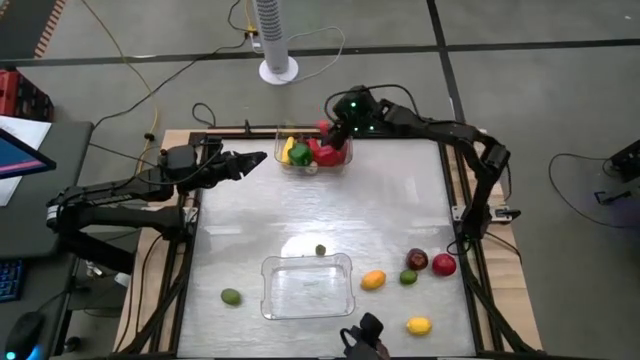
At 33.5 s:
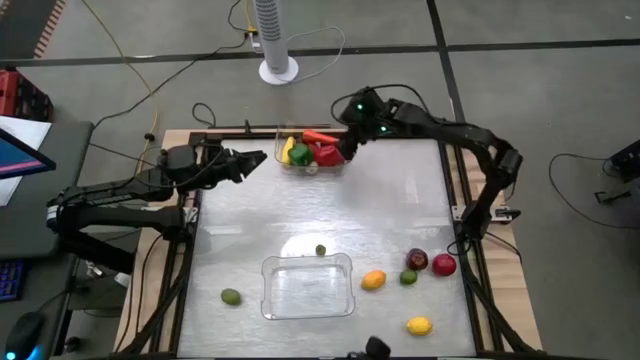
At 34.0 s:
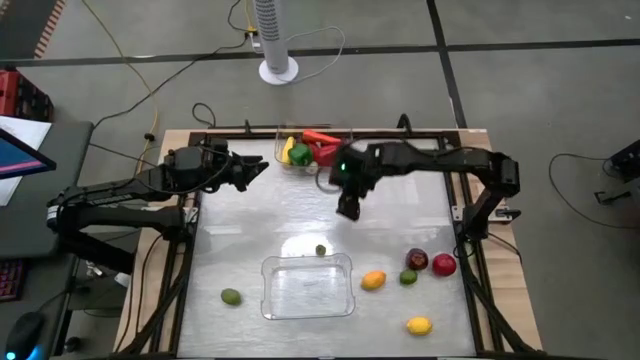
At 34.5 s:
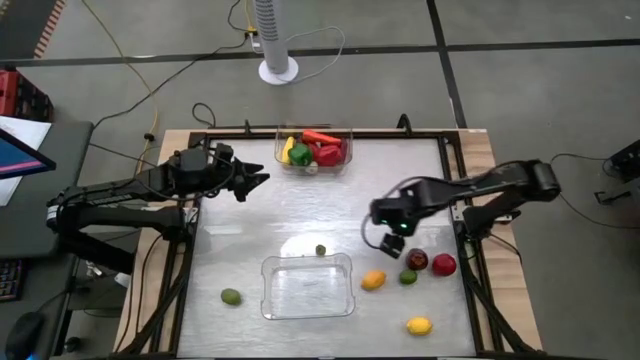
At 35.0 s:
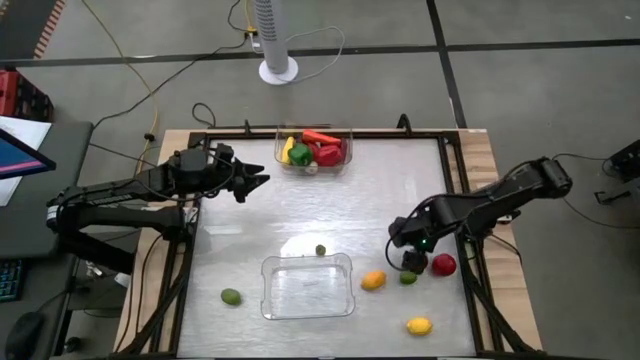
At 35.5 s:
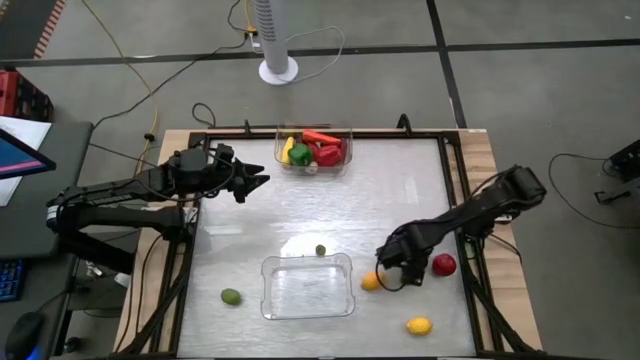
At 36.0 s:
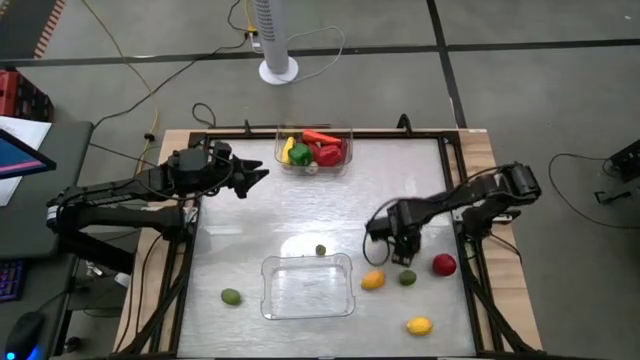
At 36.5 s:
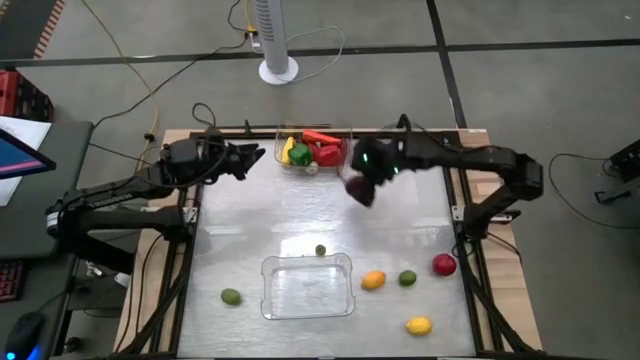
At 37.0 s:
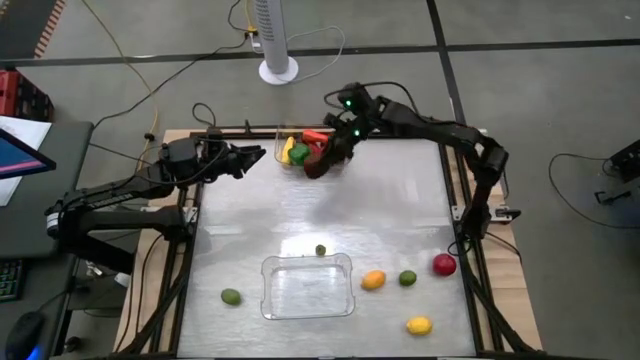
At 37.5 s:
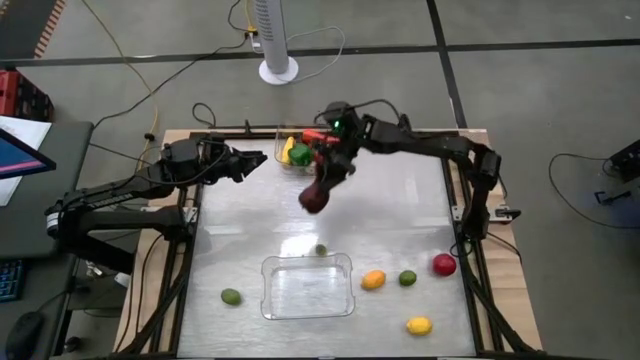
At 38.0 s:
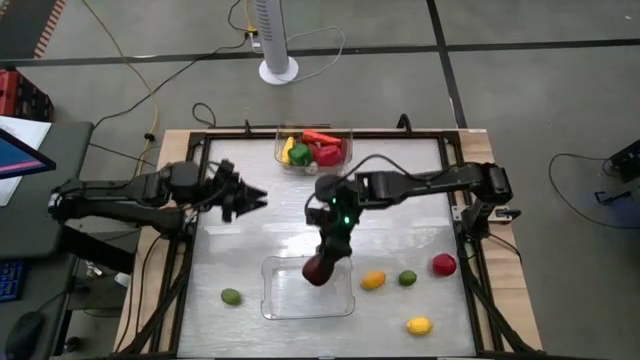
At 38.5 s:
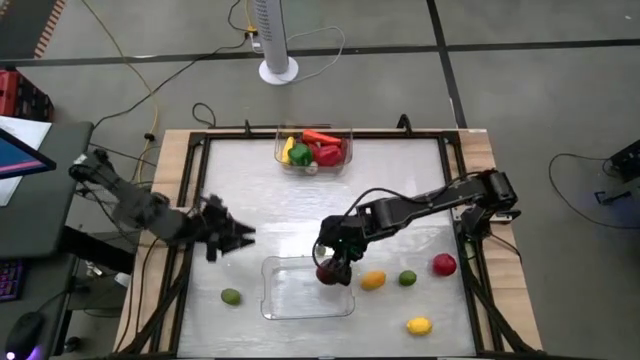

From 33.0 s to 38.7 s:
Task: Sort produce into baskets
Put the apple into the bottom transparent bin

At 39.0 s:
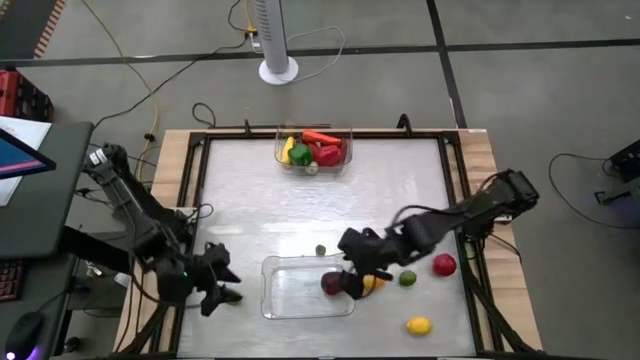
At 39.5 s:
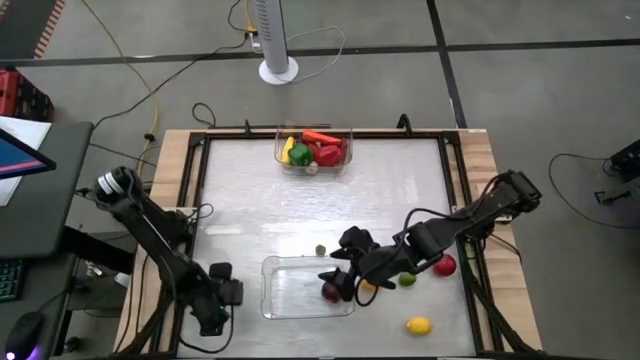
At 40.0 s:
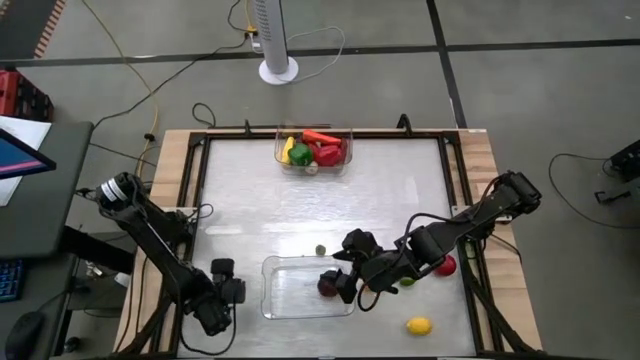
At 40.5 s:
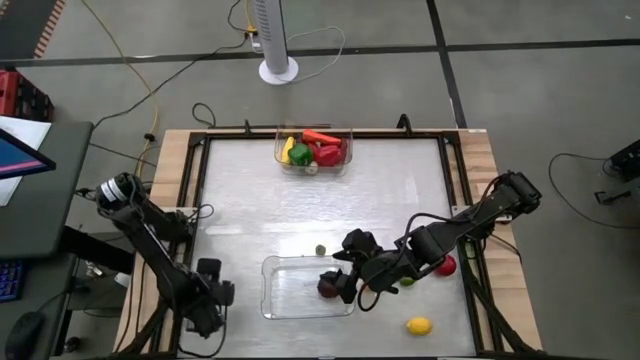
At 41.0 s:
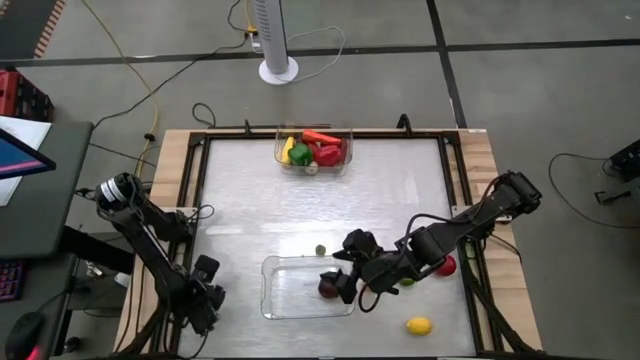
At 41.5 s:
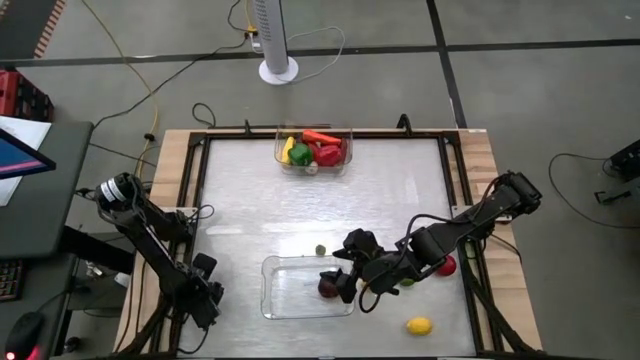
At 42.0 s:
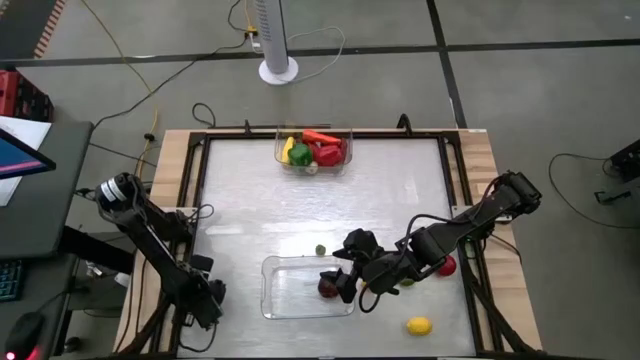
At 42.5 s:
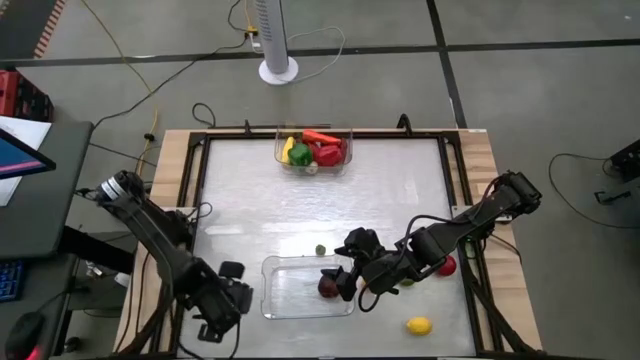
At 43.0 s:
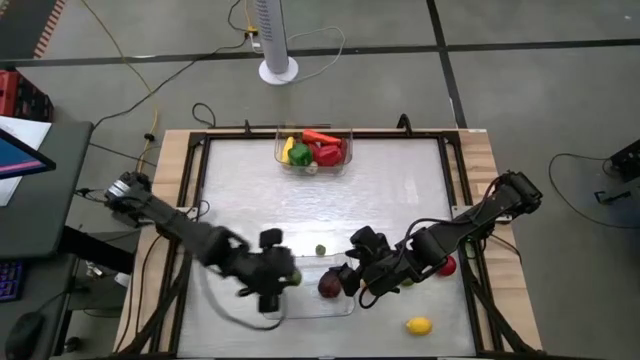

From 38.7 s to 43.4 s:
Put the top left green lime into the bottom transparent bin

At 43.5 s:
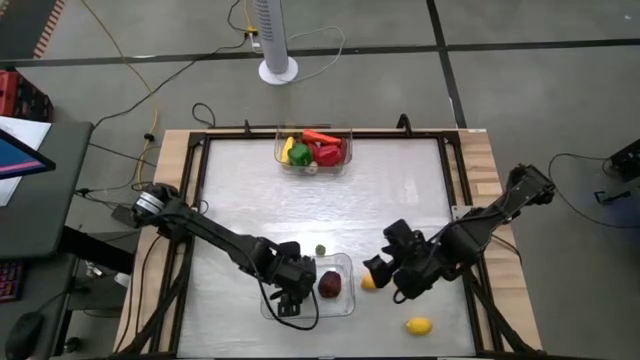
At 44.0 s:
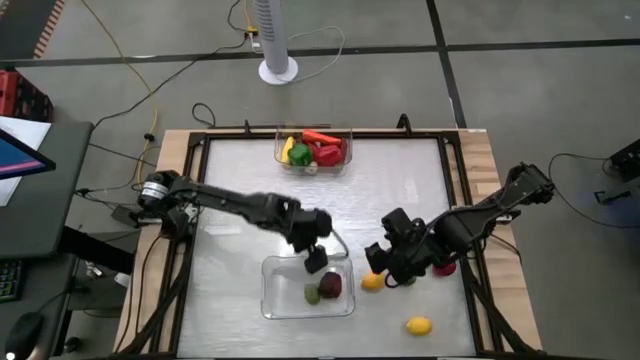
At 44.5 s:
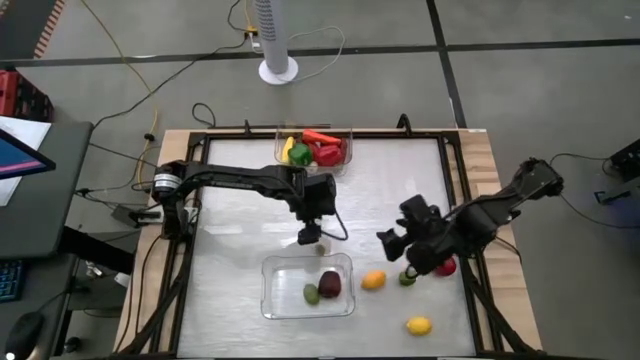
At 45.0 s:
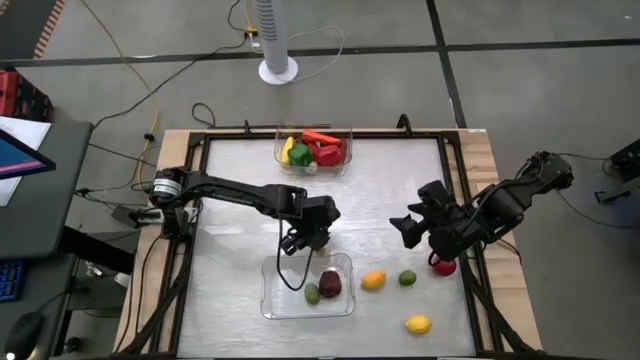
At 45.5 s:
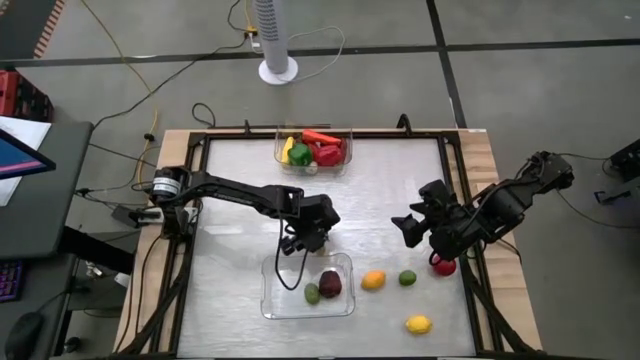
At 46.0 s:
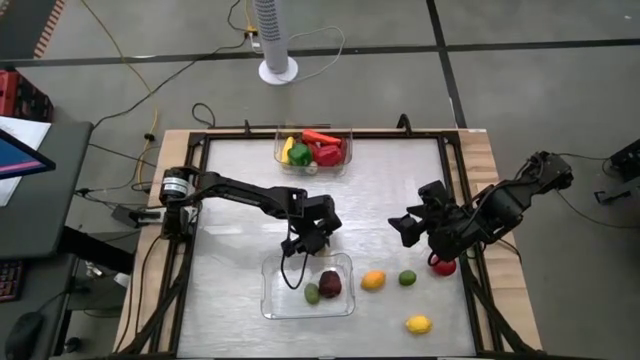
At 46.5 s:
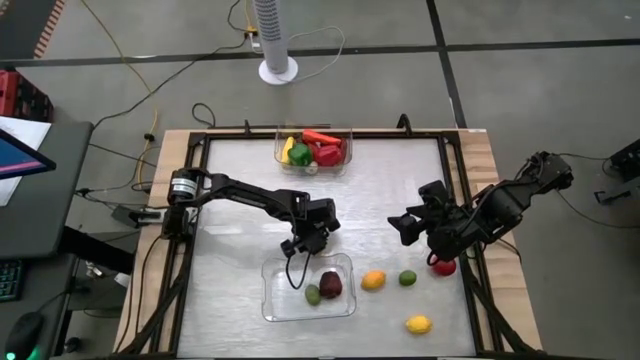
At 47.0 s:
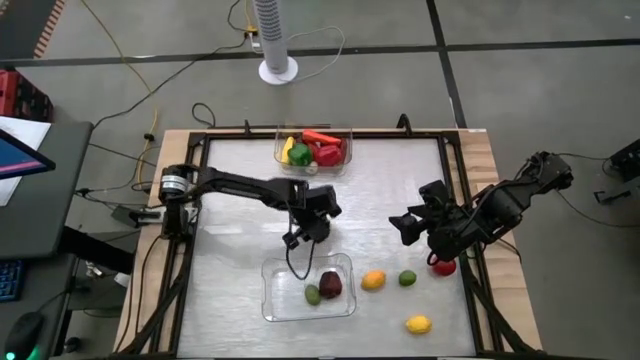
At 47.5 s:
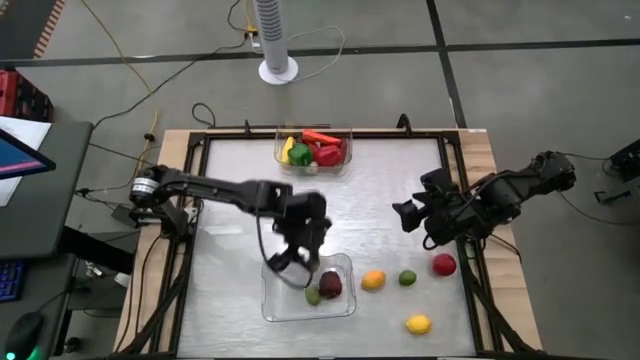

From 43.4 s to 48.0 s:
Put the orange tomato into the bottom transparent bin

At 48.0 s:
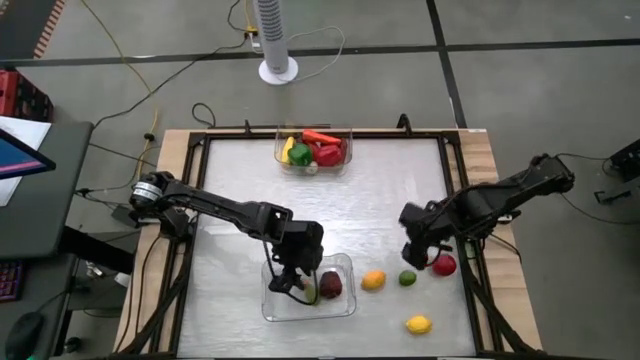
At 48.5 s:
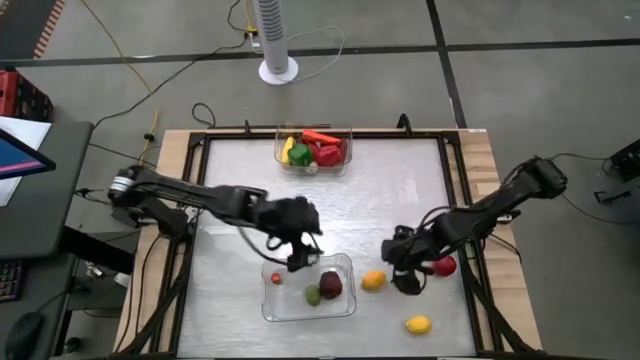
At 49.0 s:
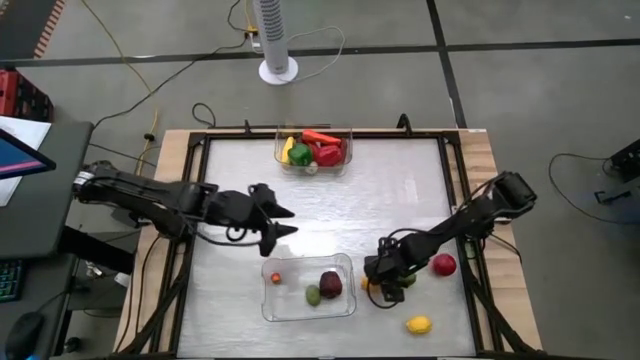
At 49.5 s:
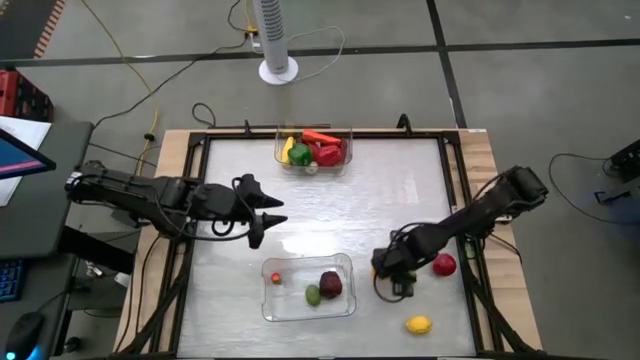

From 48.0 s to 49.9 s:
Put the top yellow lemon into the bottom transparent bin

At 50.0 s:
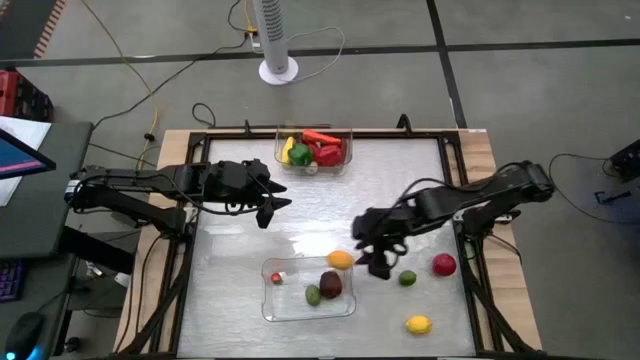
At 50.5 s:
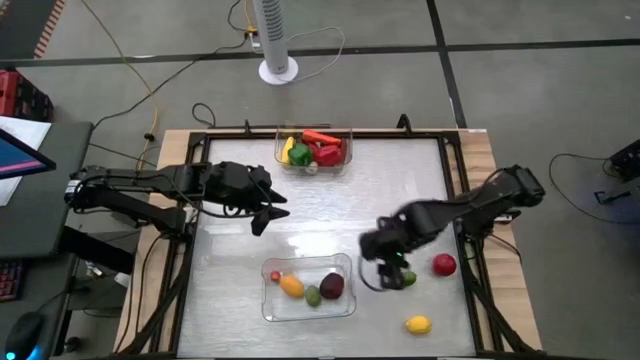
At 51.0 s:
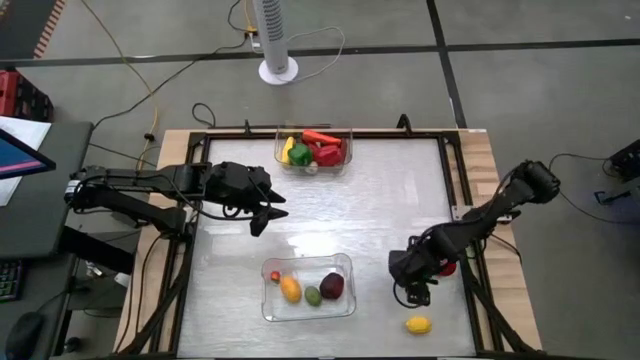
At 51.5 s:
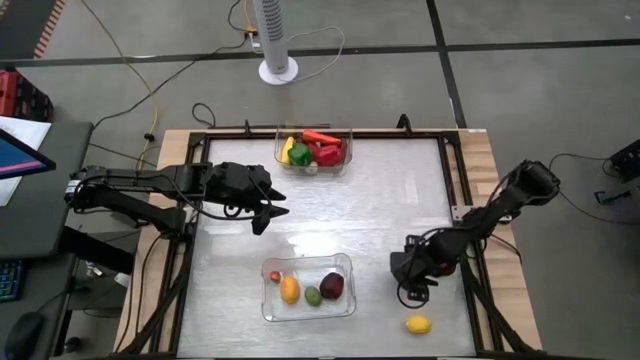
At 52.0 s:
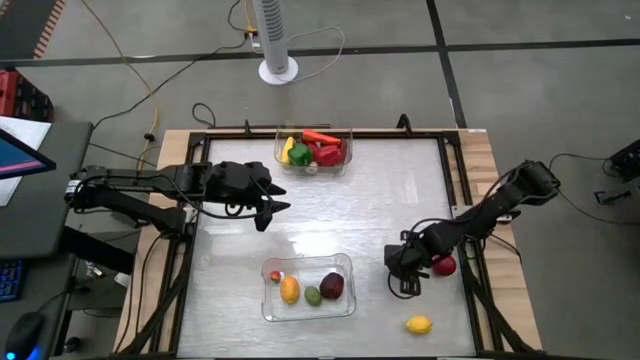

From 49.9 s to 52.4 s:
Put the green lime into the bottom transparent bin

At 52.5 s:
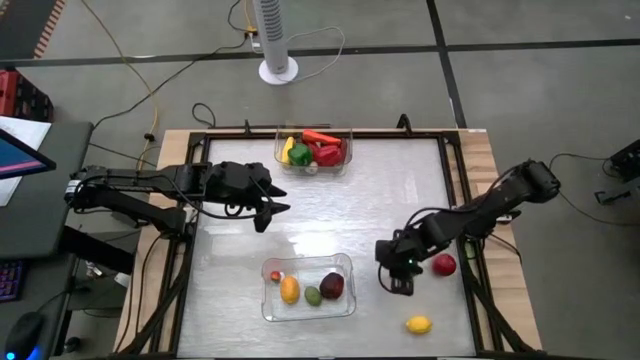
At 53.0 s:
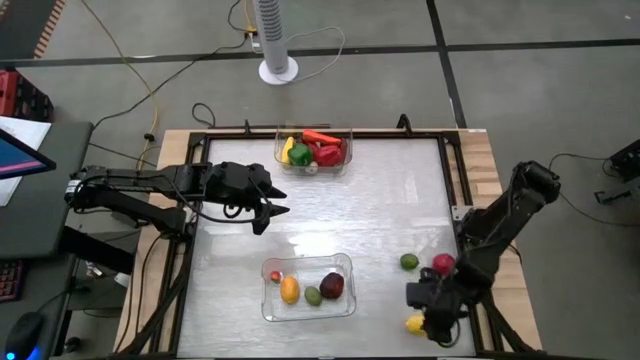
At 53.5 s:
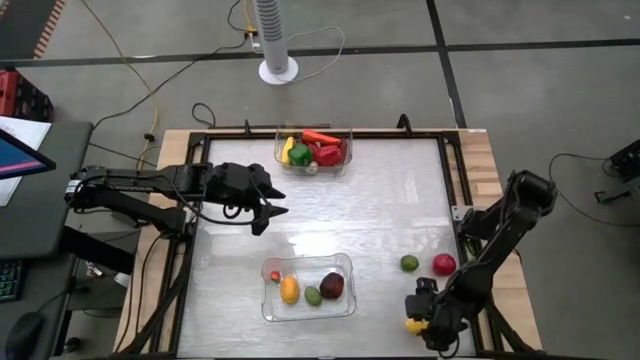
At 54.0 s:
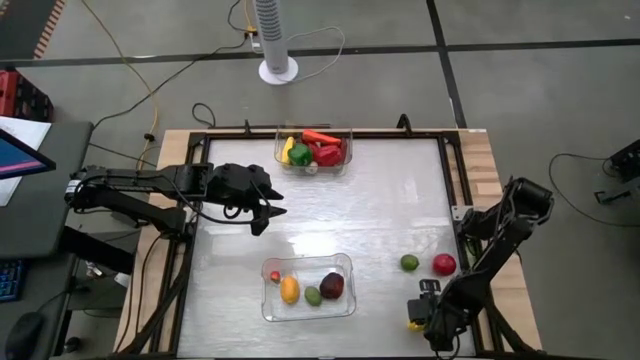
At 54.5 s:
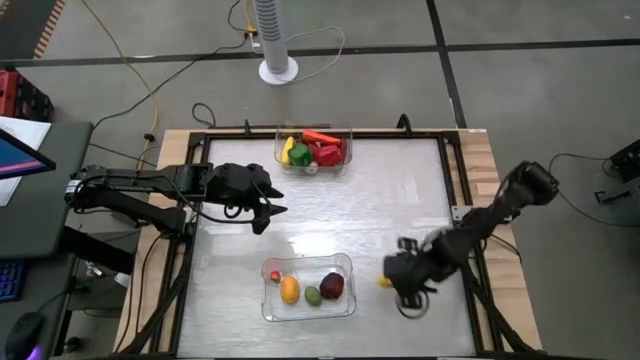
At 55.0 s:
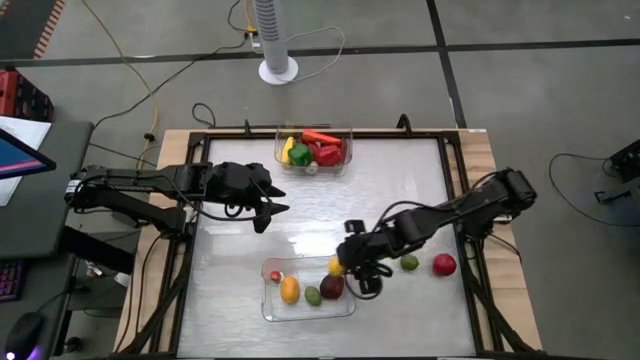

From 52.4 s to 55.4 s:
Put the yellow lemon into the bottom transparent bin
